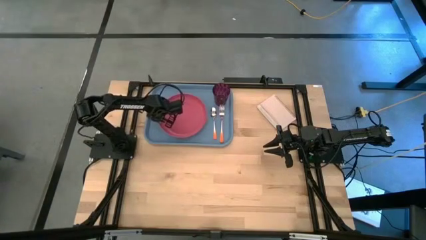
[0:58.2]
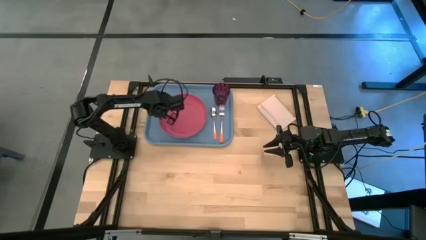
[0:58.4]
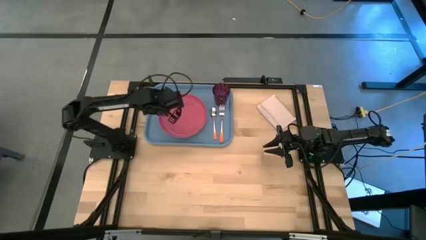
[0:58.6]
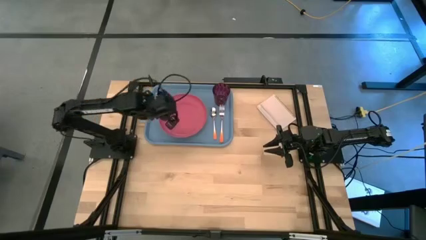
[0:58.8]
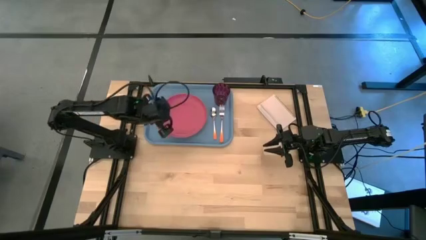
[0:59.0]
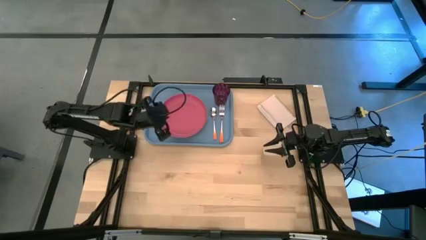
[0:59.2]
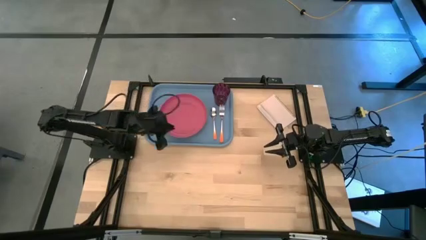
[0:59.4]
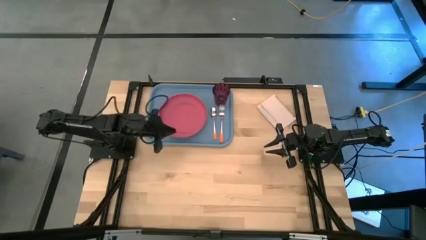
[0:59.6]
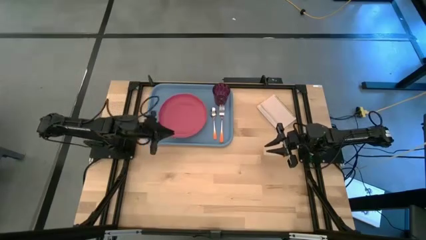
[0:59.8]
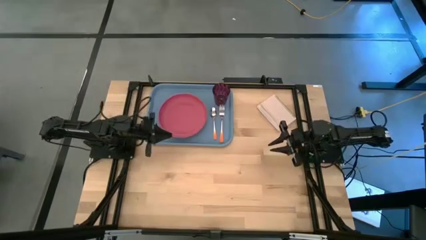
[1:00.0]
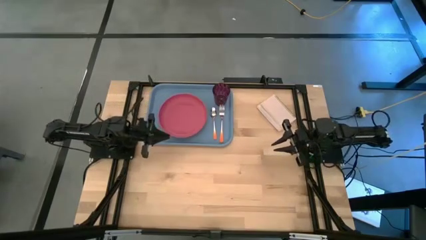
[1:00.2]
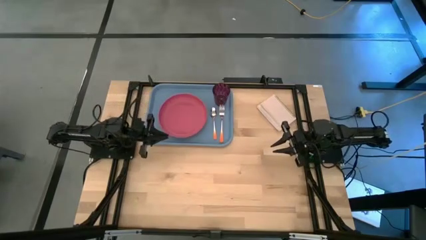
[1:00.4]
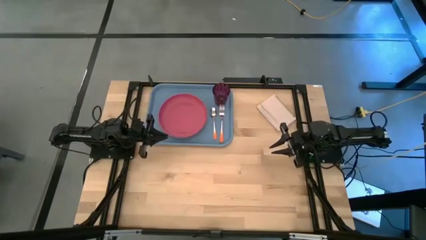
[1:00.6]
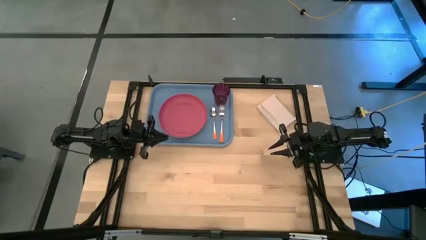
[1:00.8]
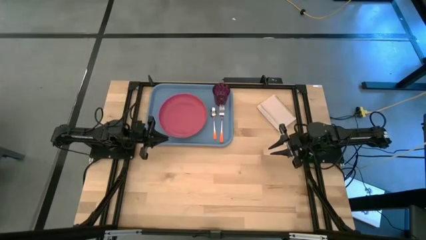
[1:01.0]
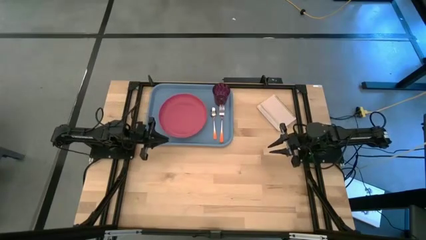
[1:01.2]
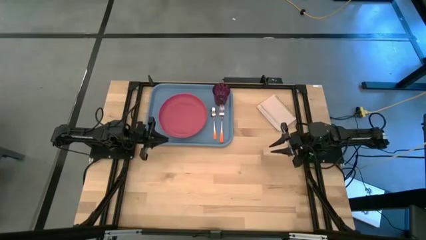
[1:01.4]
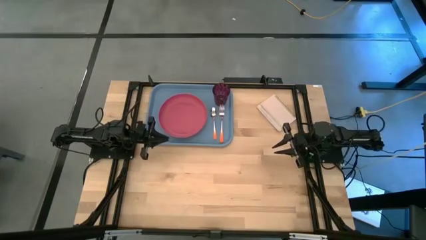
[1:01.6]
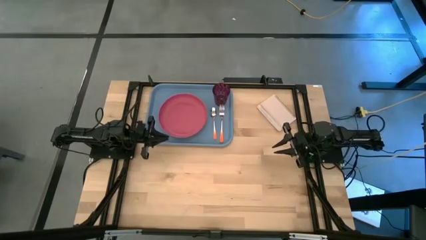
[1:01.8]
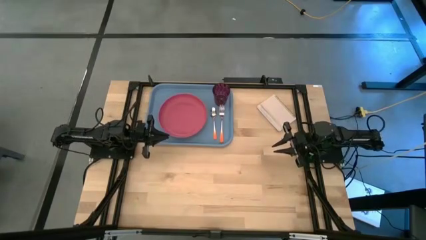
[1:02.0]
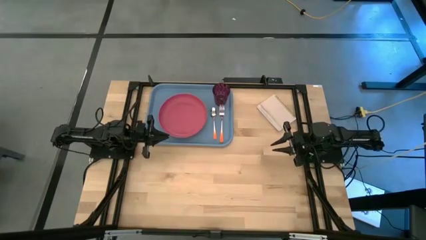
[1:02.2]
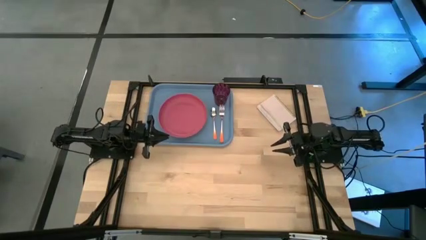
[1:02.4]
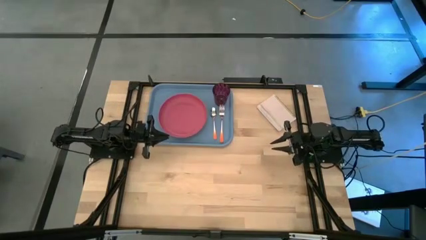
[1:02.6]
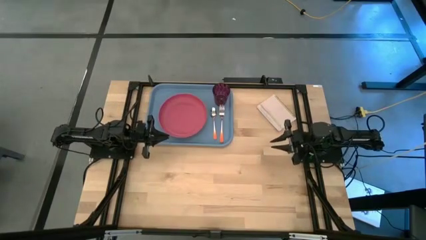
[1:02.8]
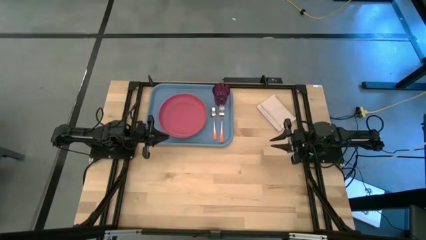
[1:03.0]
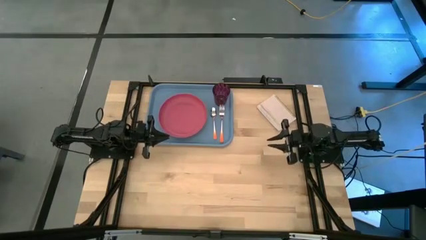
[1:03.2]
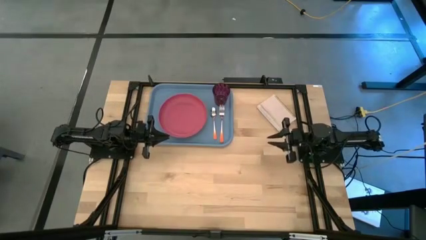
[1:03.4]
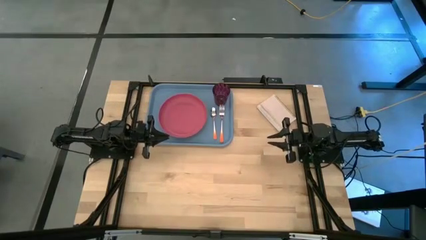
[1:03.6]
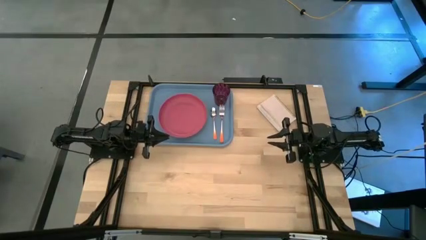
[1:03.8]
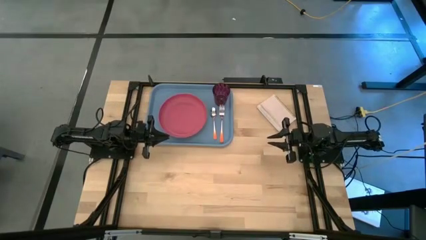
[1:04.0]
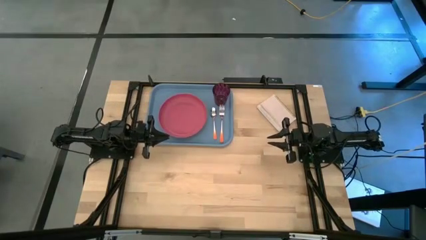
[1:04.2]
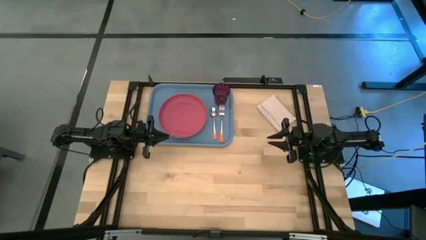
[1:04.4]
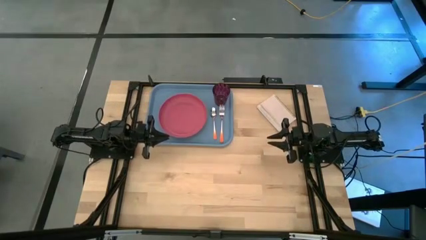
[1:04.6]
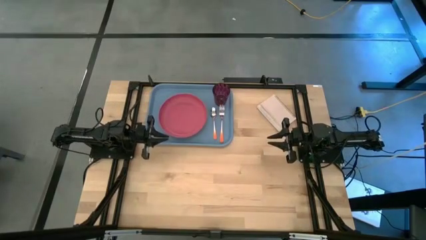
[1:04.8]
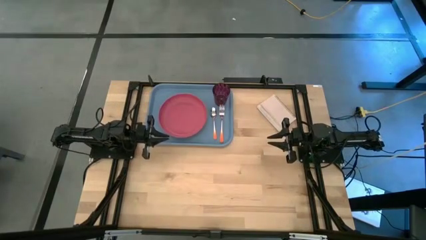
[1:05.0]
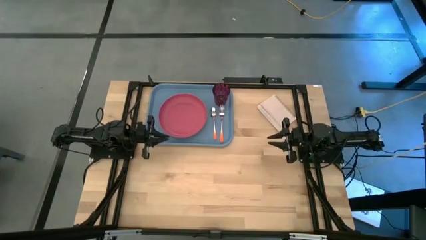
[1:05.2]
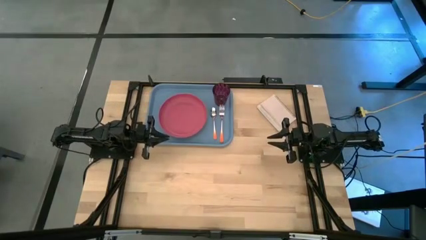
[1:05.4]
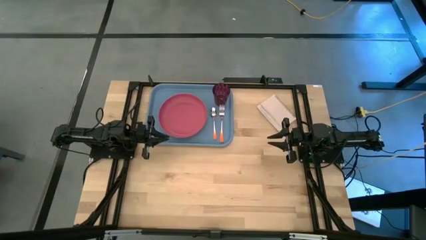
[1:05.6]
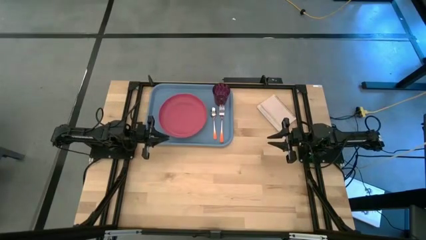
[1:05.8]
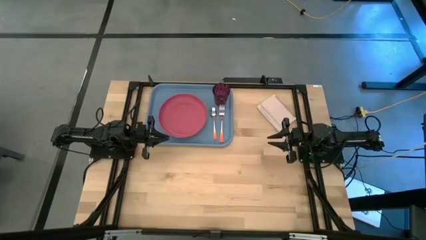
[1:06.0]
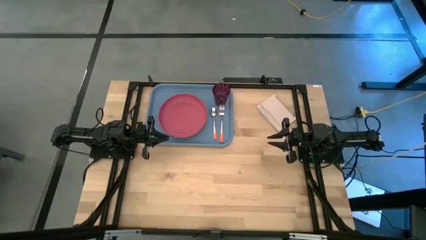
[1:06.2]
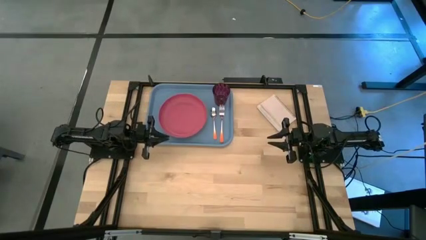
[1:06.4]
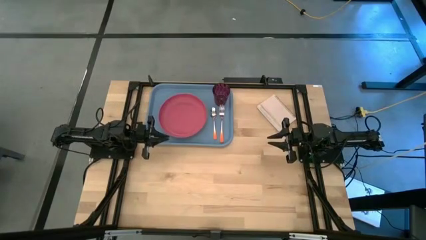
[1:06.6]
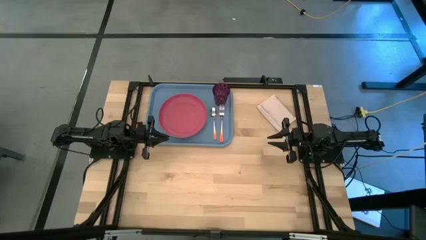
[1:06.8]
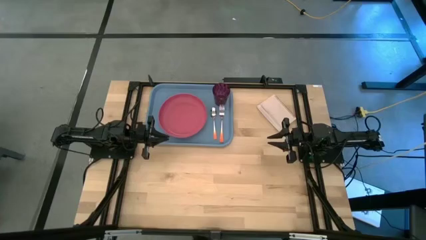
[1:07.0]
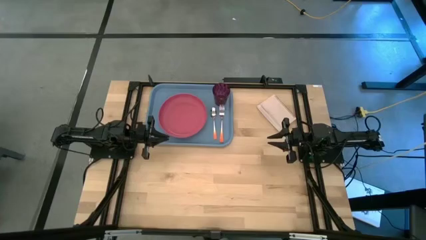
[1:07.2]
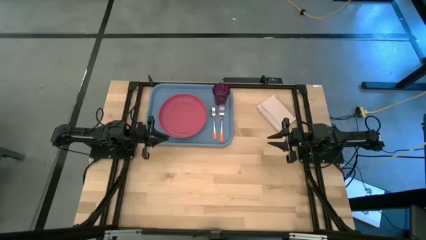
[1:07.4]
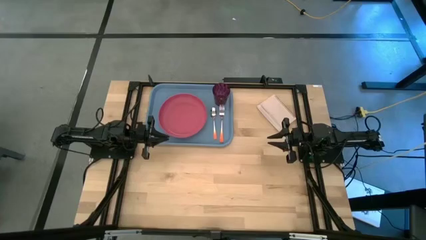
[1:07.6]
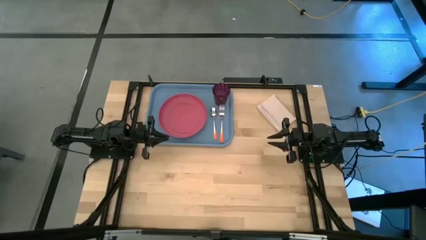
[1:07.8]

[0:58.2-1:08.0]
Task: Pick and place plate/cup/fork/spoon on tray
Return to Home Position
